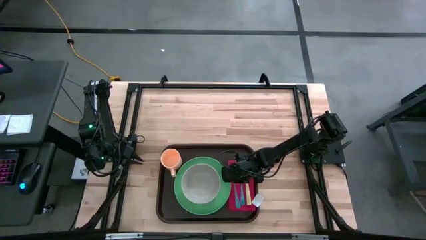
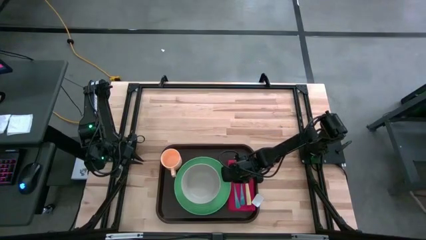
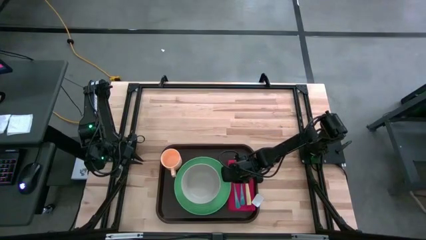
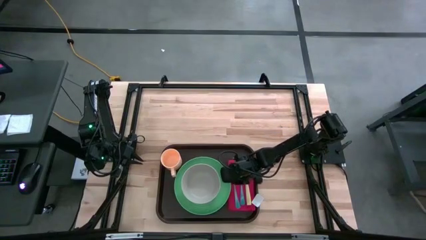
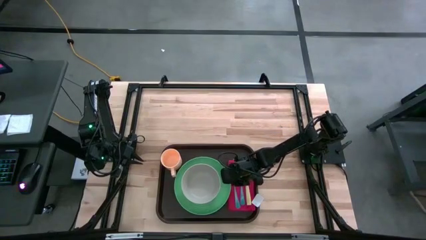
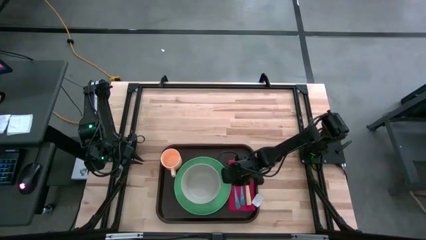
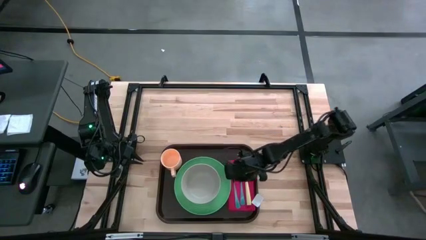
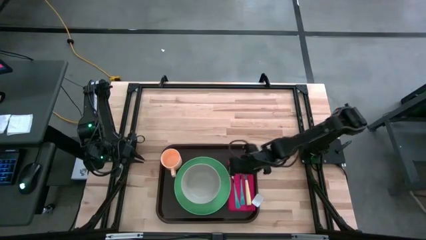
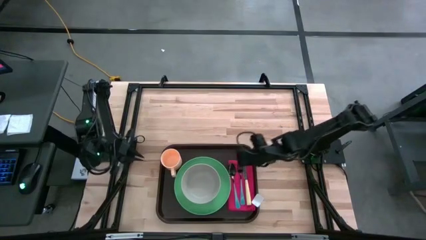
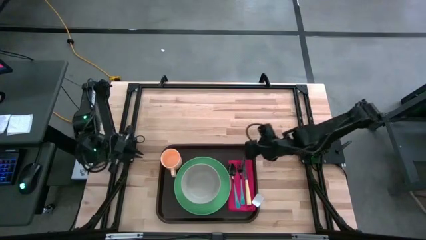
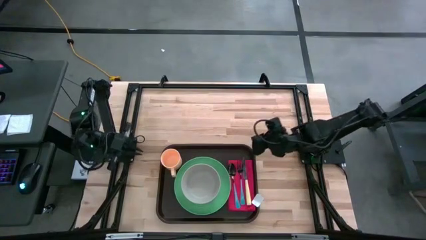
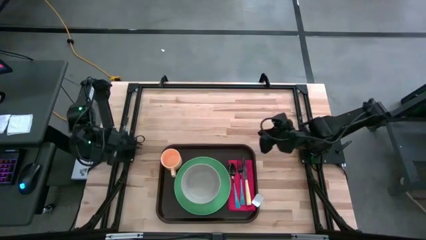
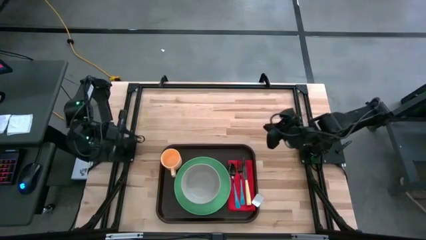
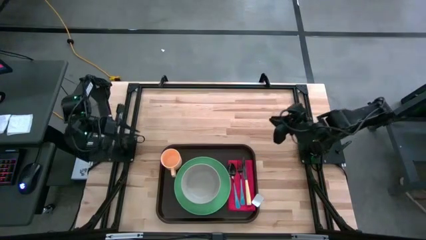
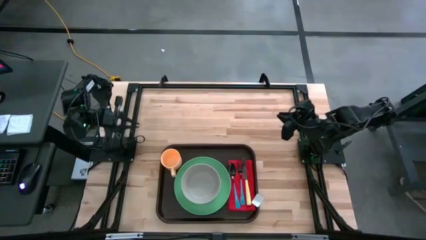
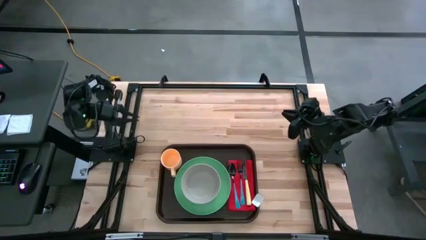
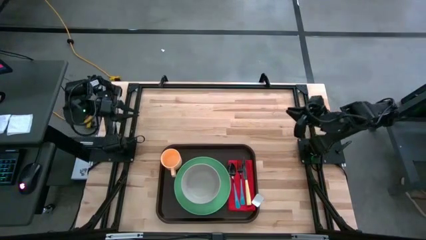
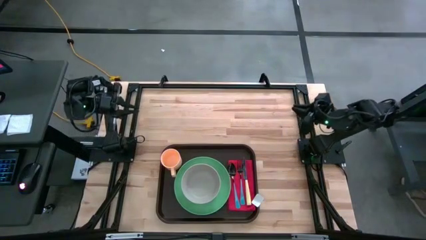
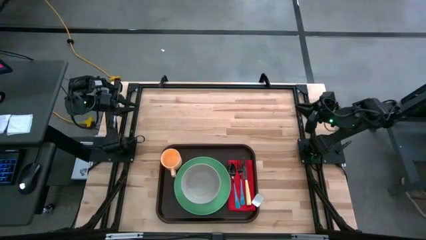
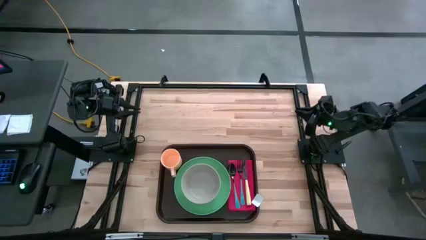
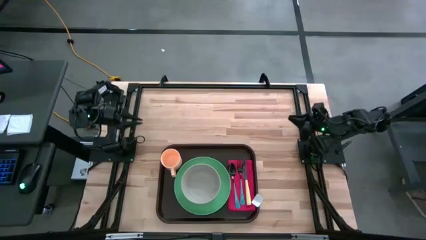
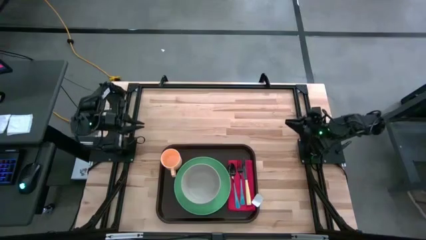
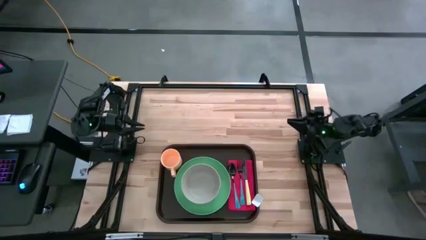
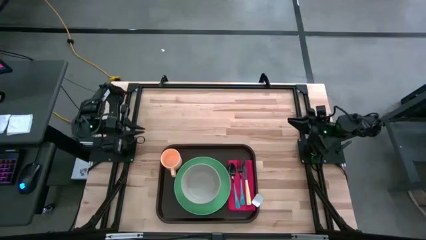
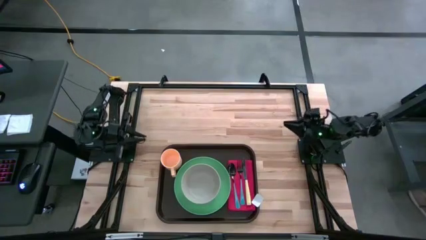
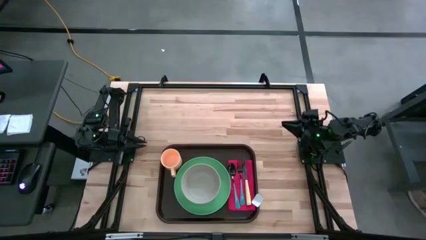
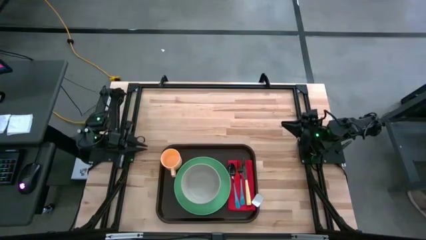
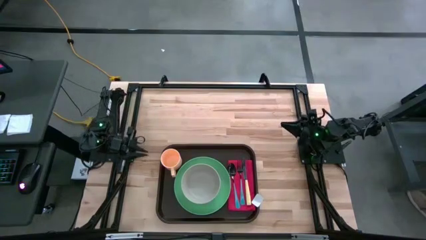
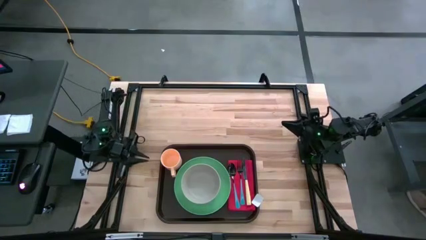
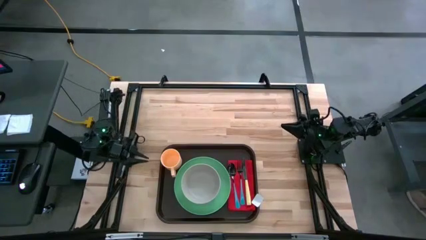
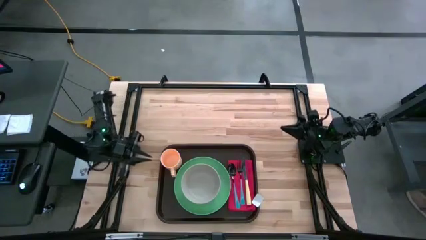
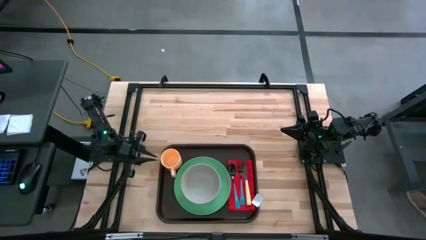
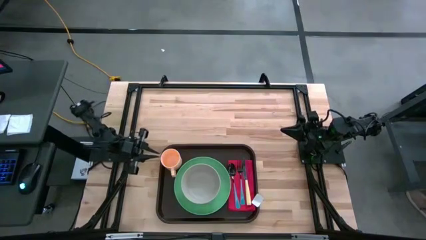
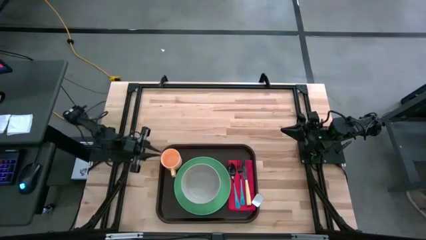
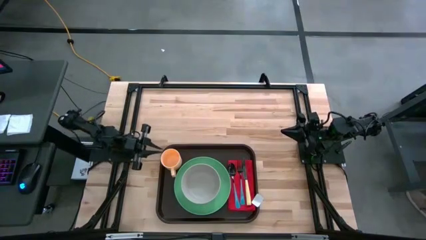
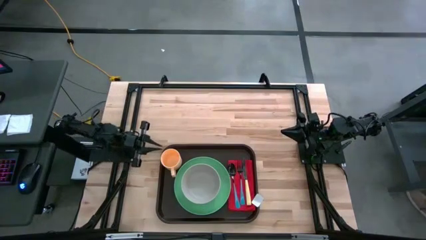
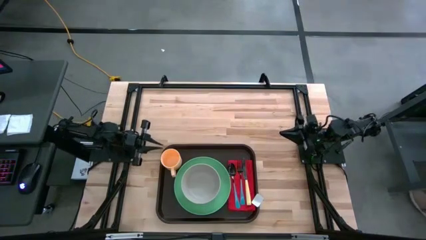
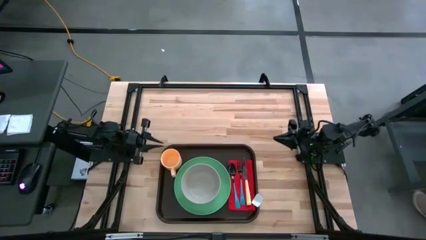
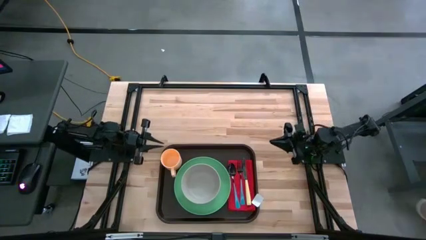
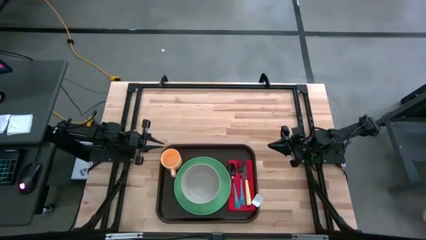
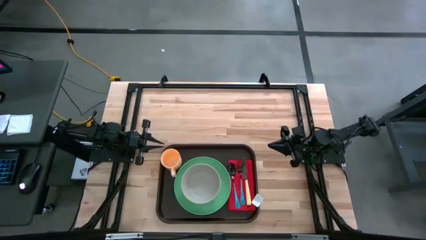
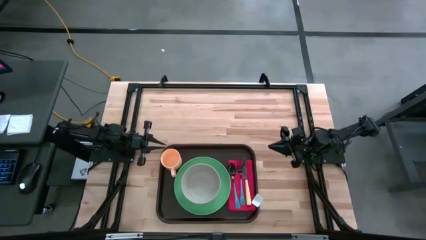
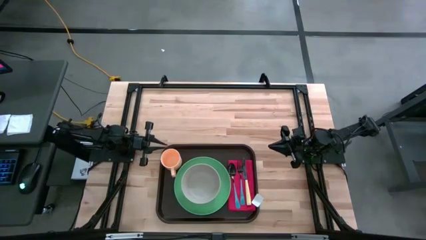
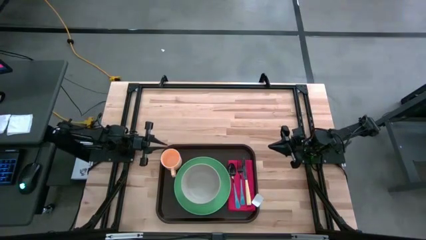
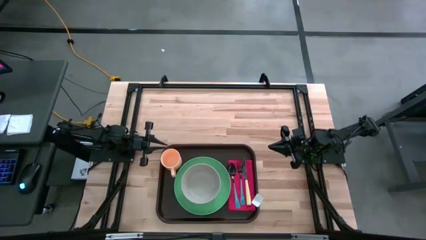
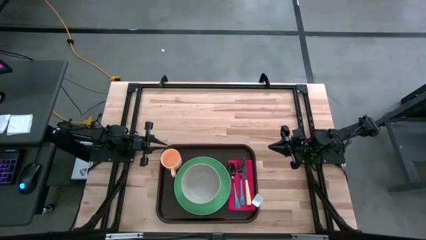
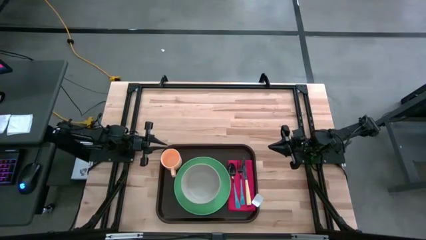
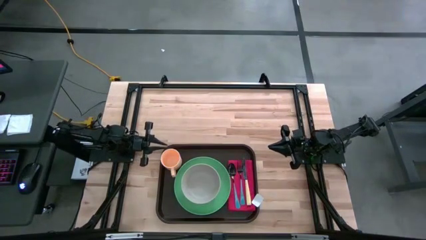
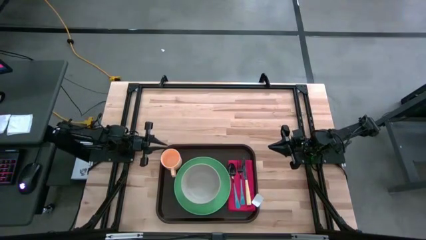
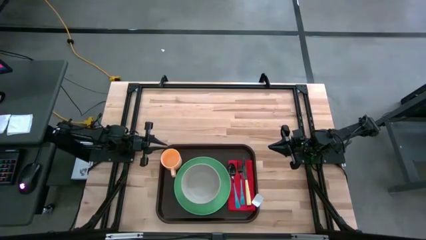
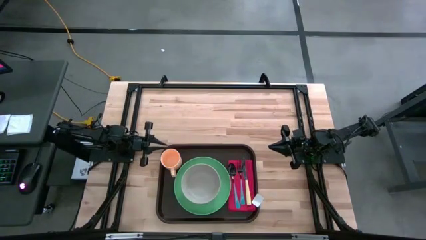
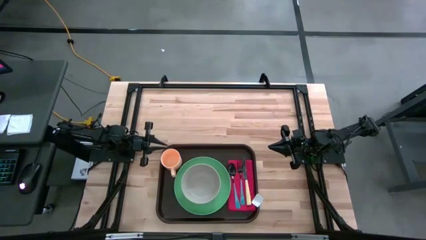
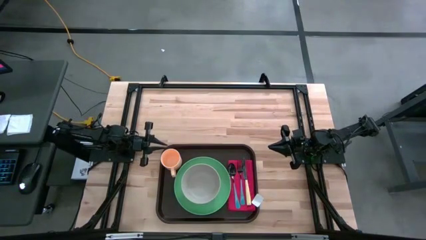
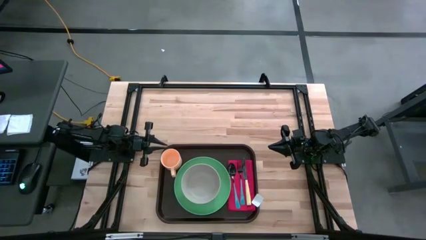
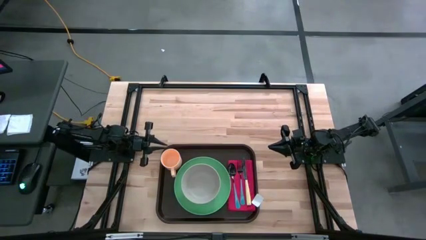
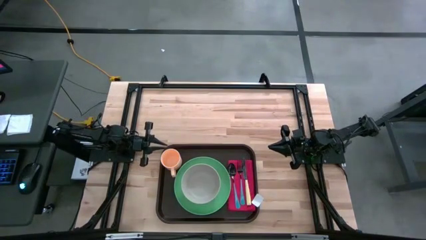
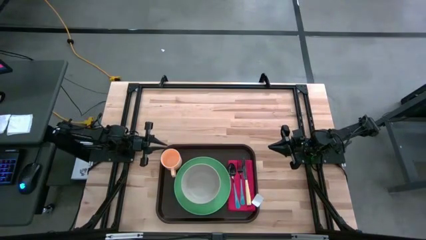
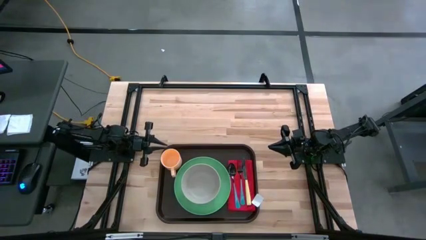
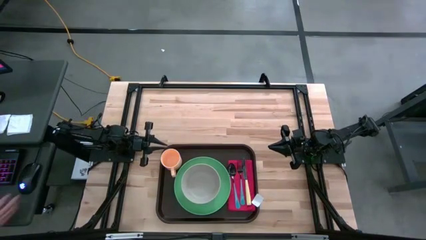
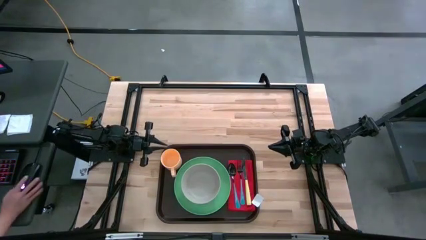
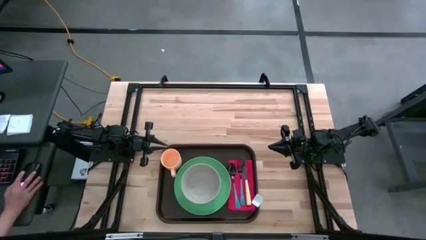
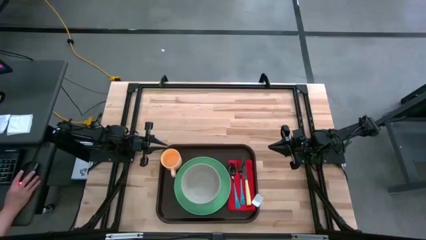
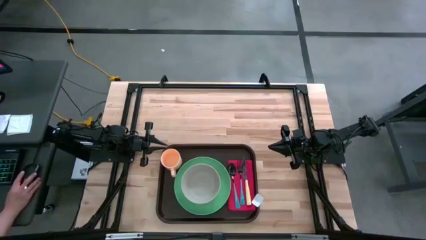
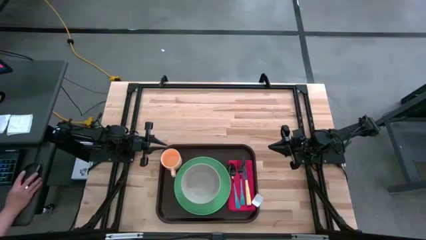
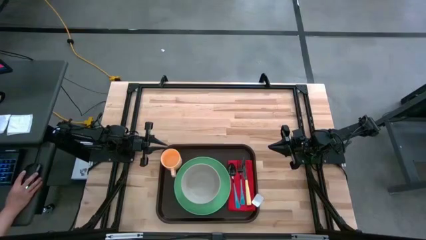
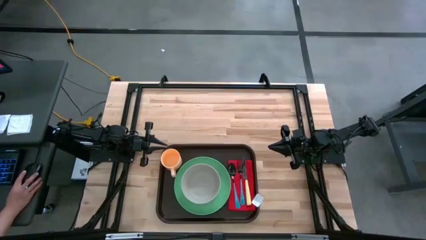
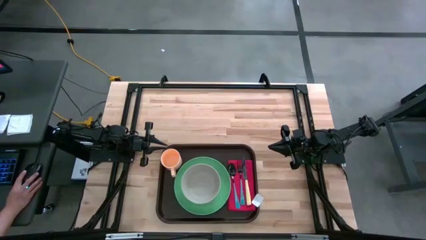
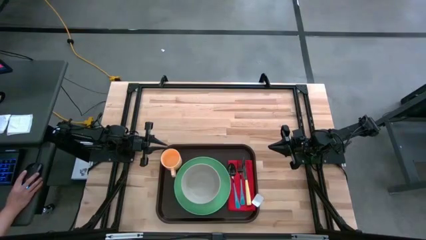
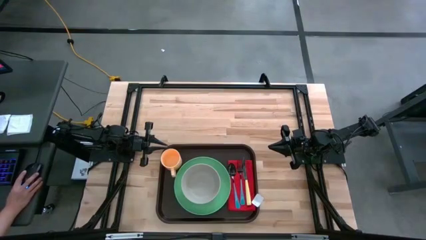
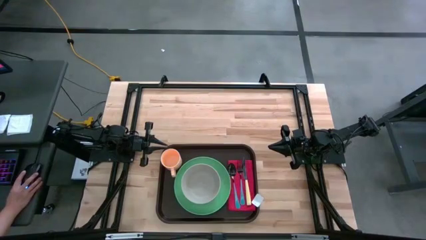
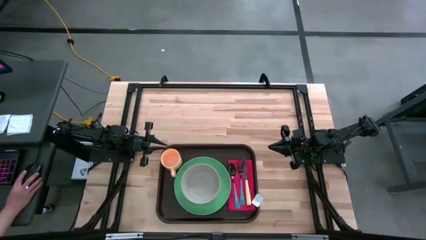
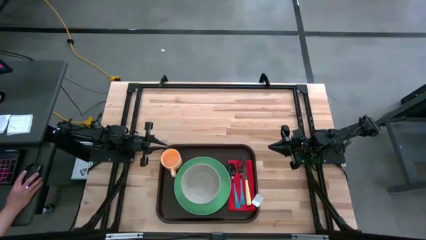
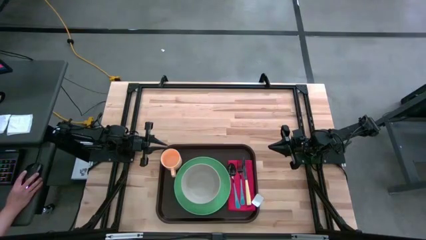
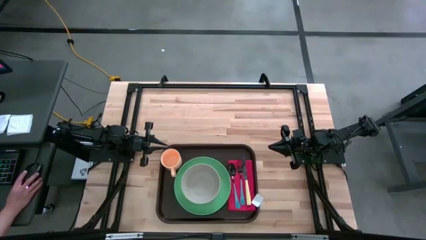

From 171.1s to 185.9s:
Task: Set up tray
Return to Home Position

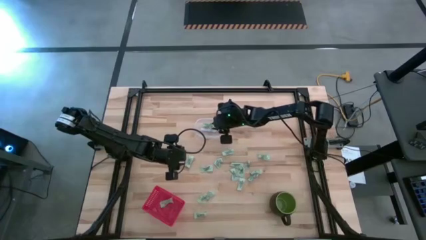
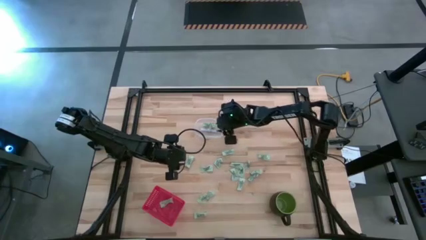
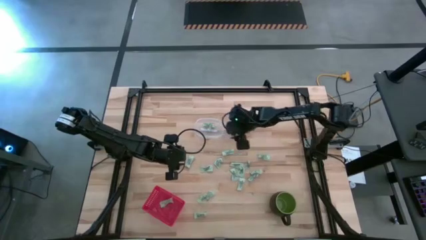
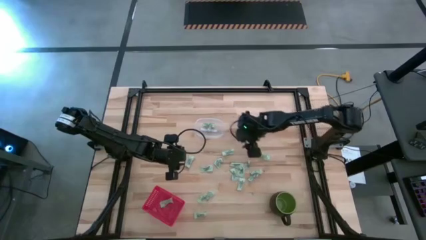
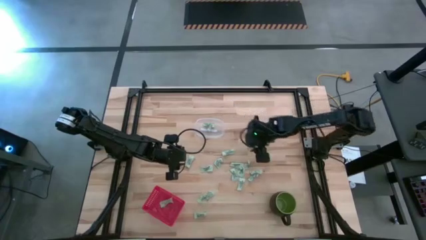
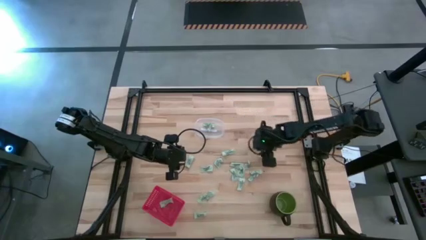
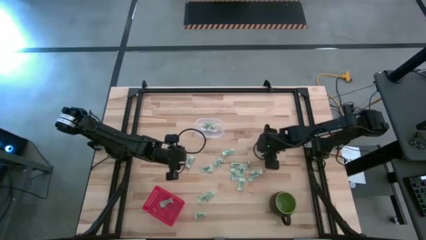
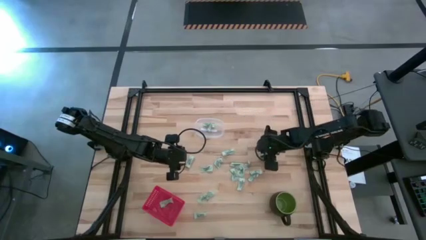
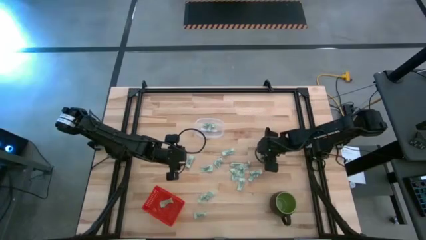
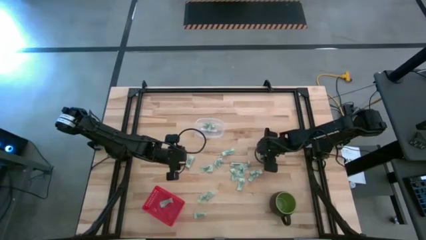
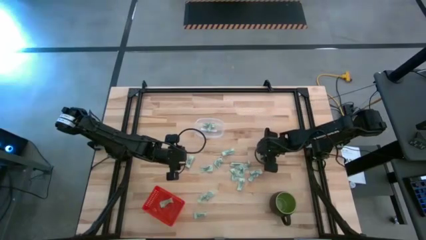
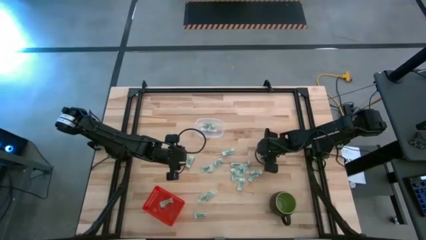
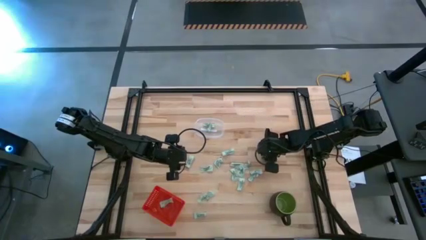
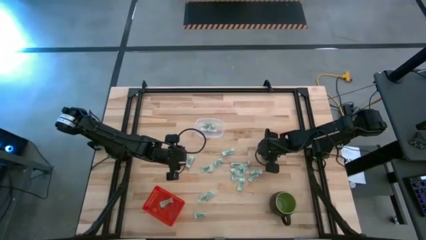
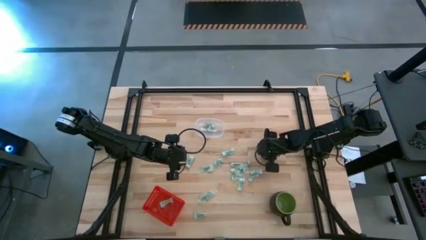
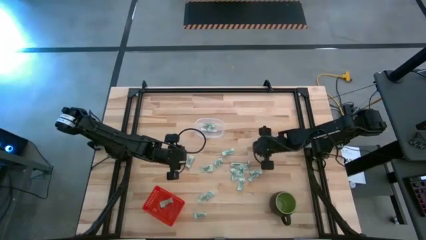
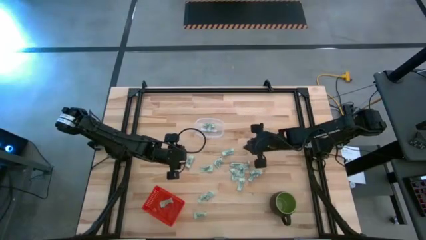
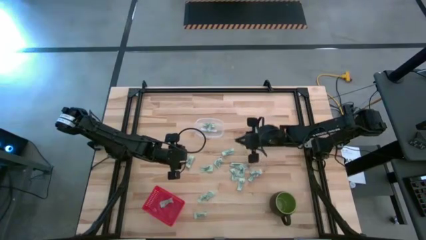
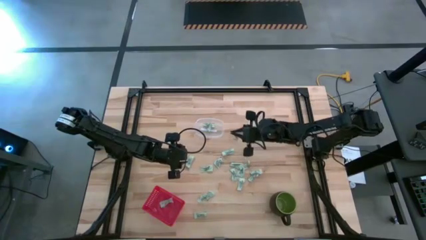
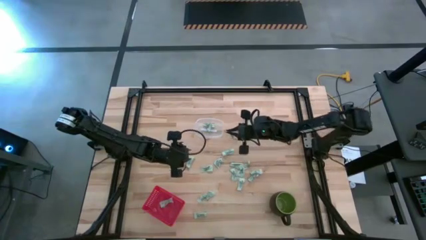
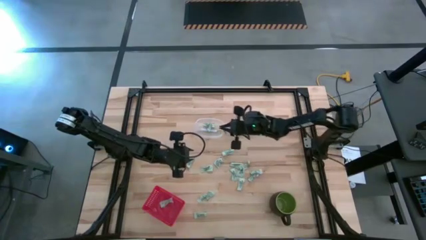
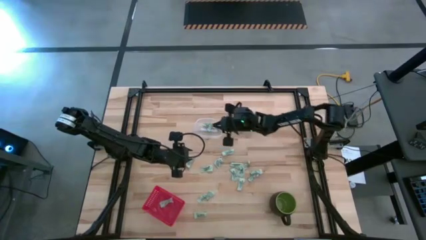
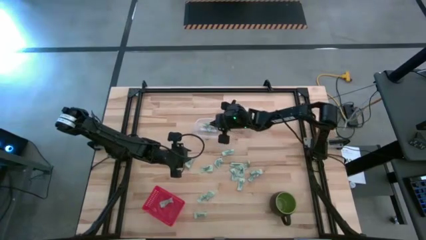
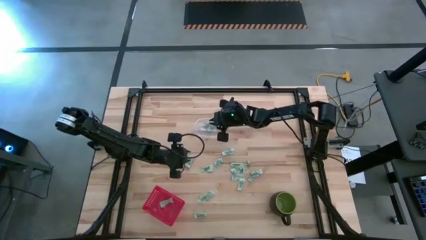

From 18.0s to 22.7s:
Task: Pick and place items into bin
Put the stevia packet into the transparent bin
